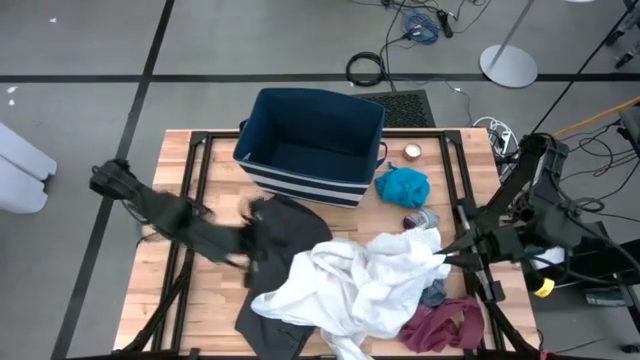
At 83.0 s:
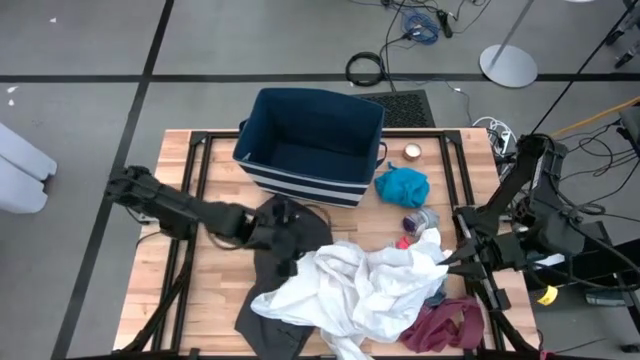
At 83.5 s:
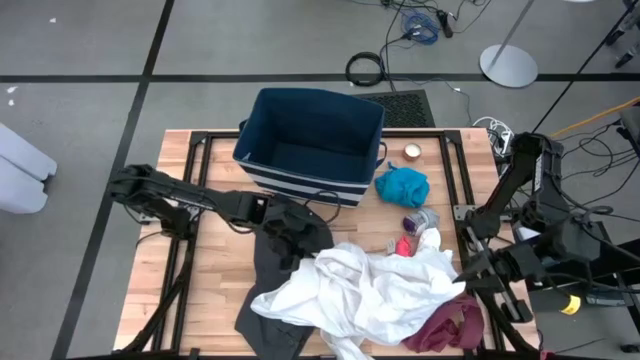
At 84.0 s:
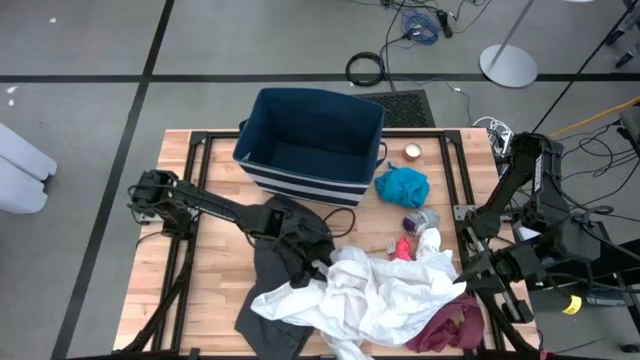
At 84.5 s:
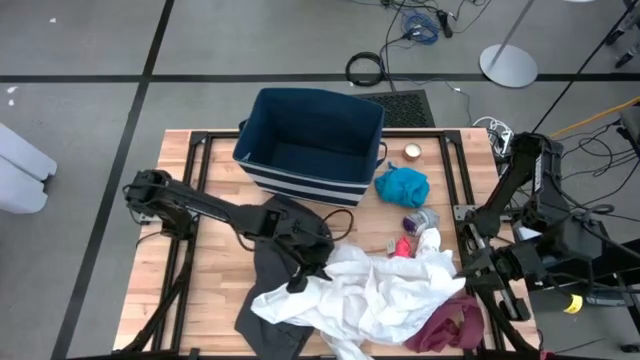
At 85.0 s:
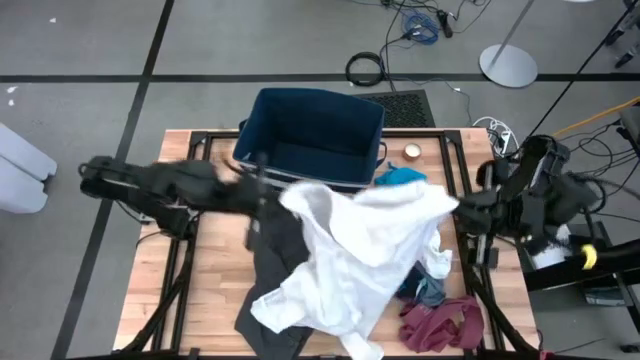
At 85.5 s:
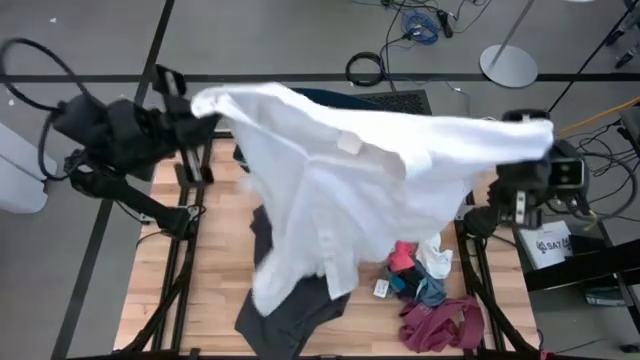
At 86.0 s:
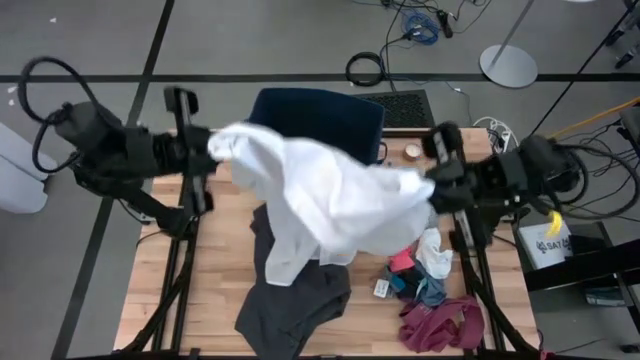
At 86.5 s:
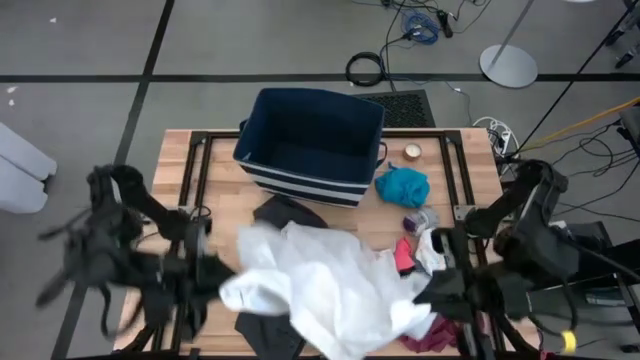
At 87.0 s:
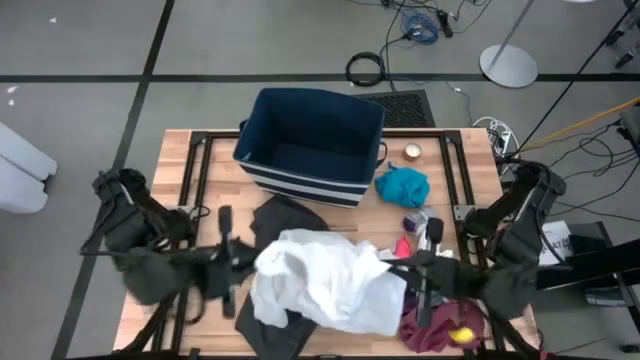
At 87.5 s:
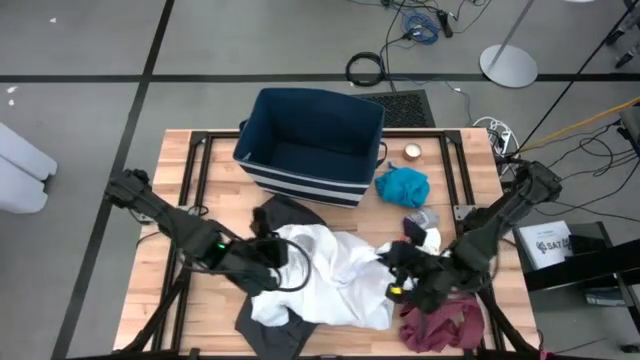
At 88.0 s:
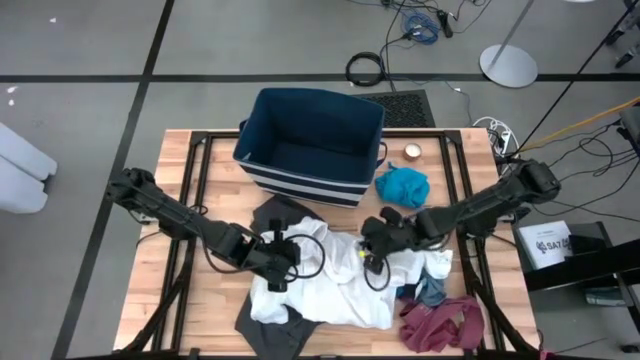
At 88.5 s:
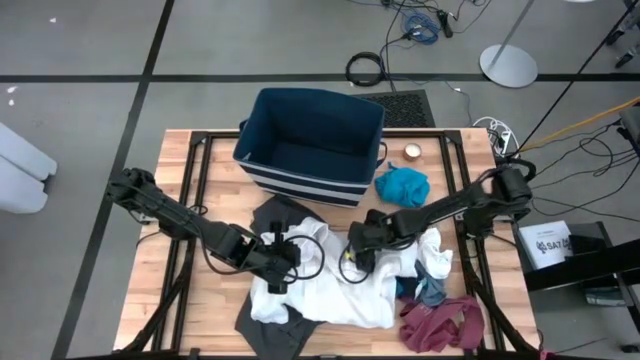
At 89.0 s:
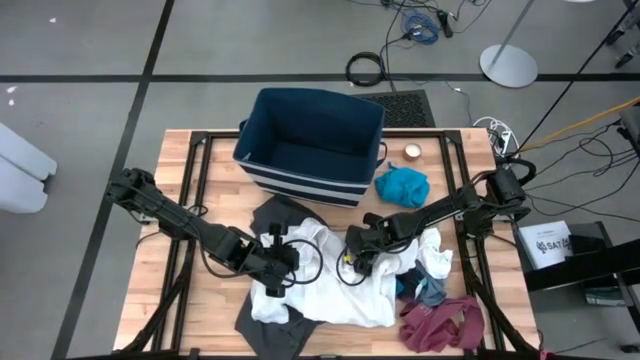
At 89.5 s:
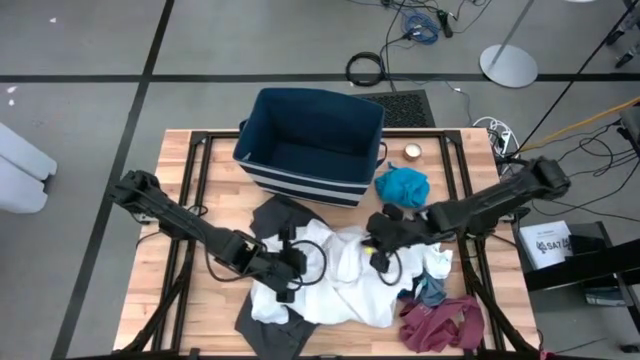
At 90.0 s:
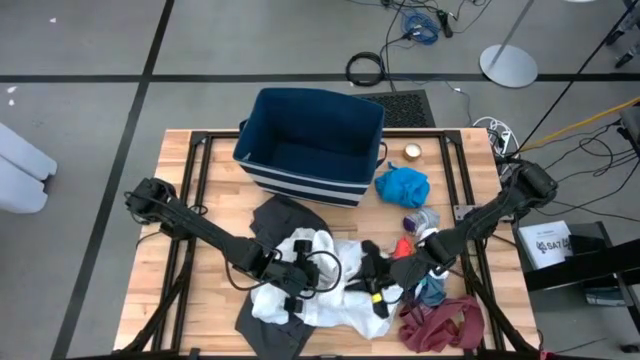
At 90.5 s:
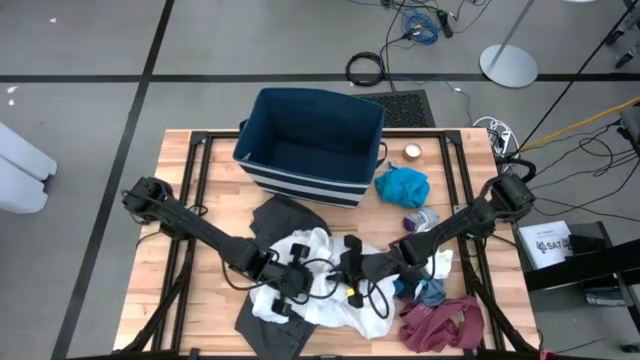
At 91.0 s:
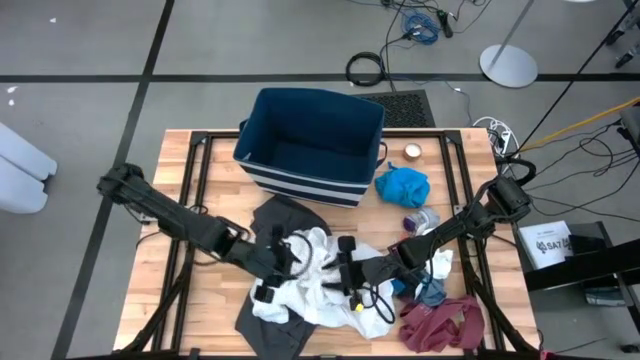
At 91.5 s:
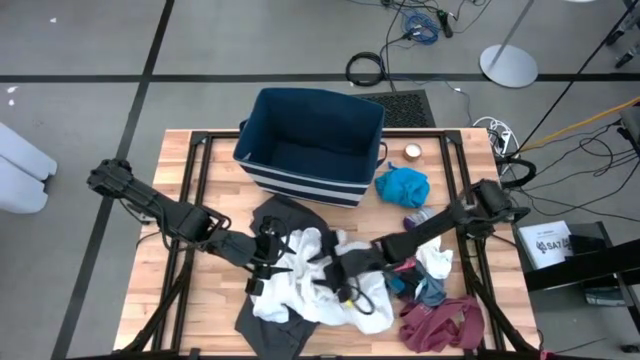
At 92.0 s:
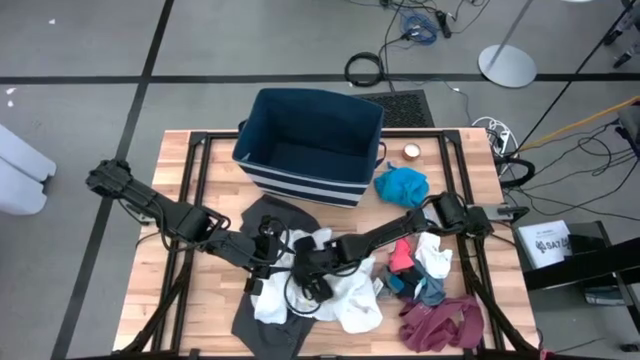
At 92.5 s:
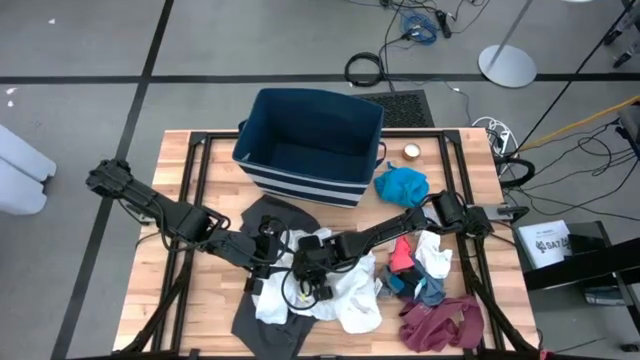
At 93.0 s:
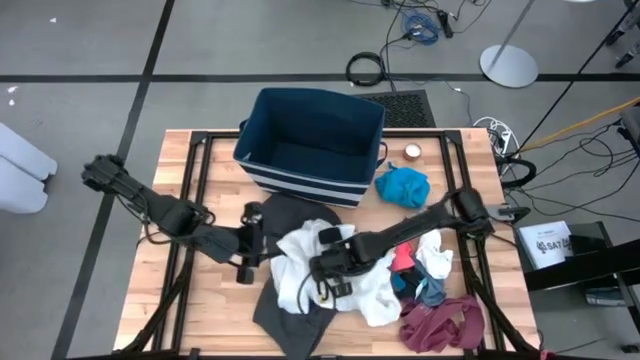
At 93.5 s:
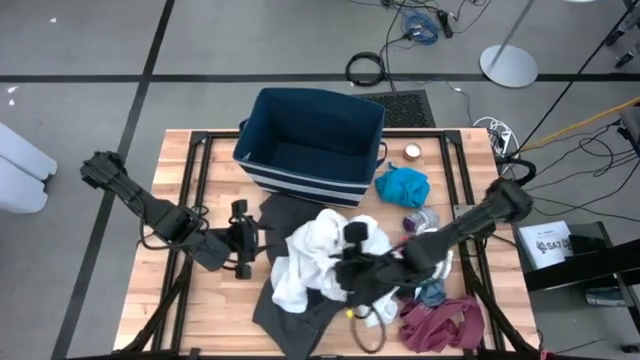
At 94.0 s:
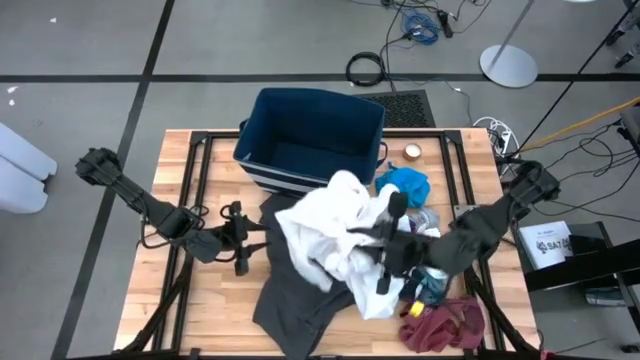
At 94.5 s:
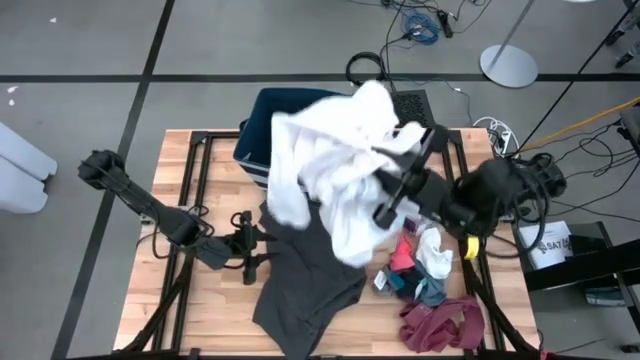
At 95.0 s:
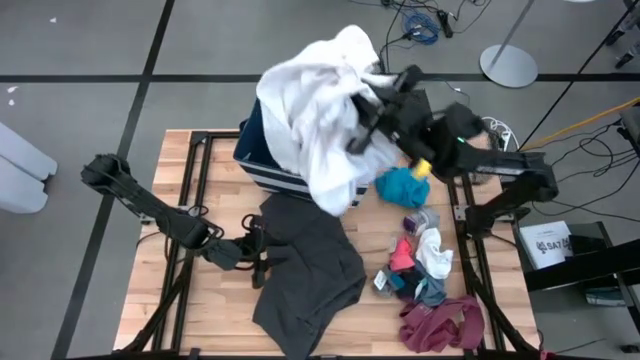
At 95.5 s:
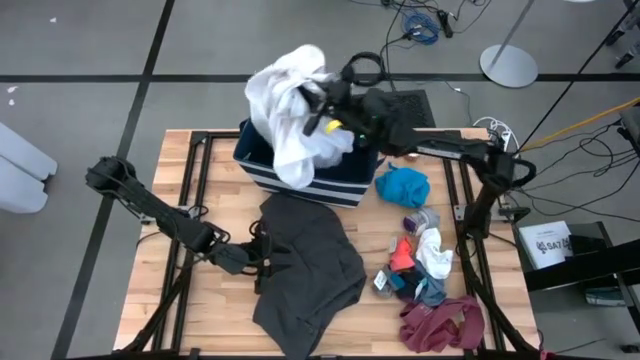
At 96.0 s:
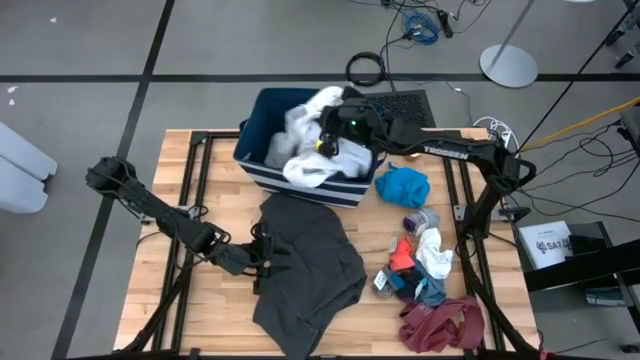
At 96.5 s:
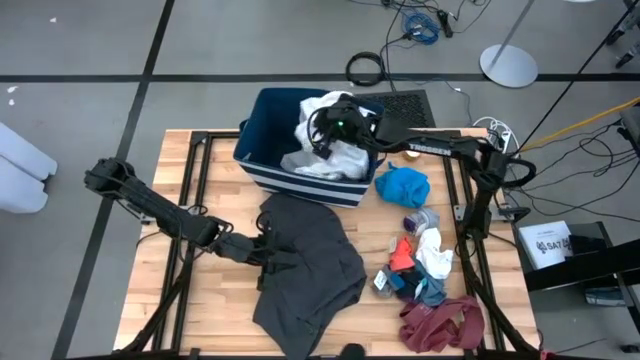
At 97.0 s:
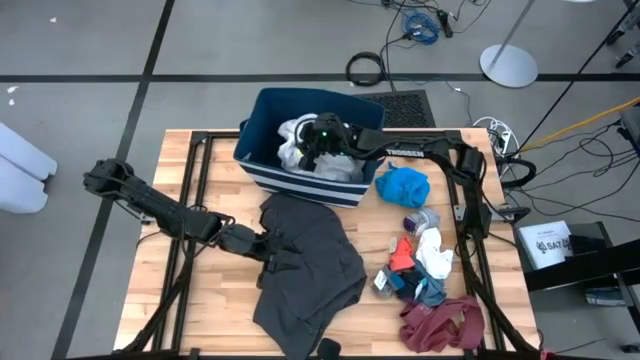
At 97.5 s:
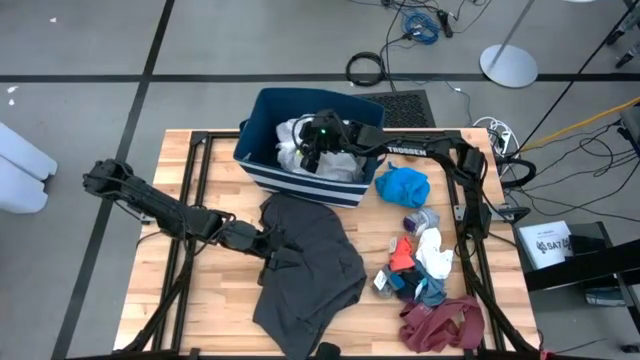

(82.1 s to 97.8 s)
Task: Sort clothes
Put the white shirt into the blue laundry bin

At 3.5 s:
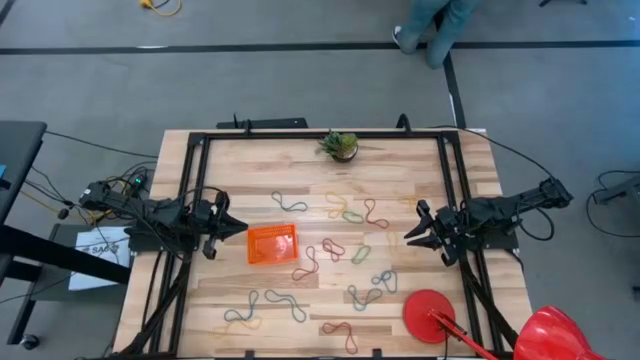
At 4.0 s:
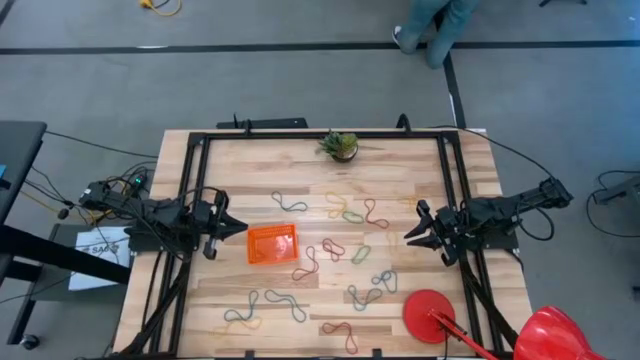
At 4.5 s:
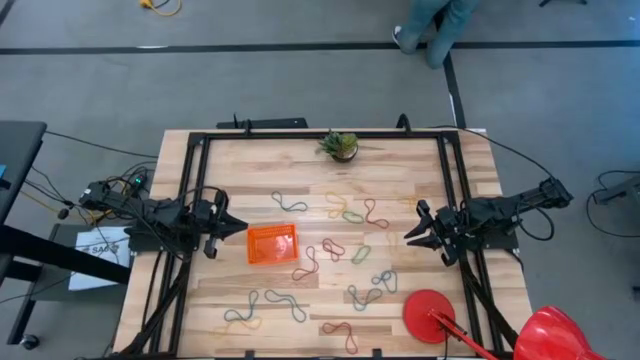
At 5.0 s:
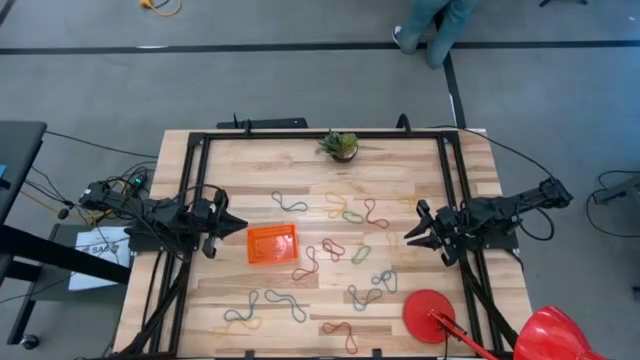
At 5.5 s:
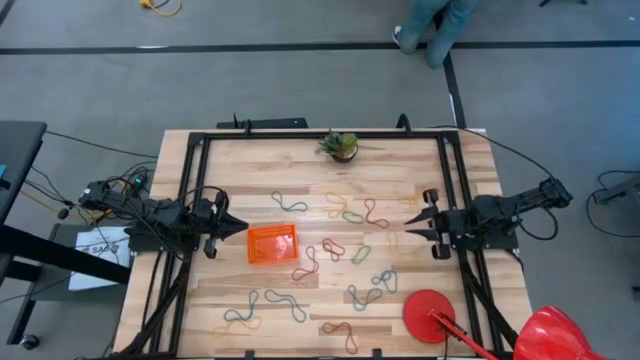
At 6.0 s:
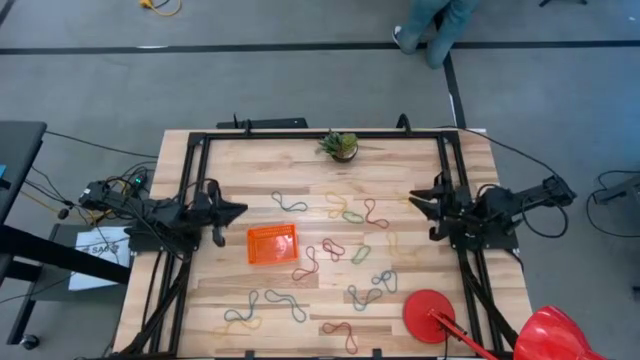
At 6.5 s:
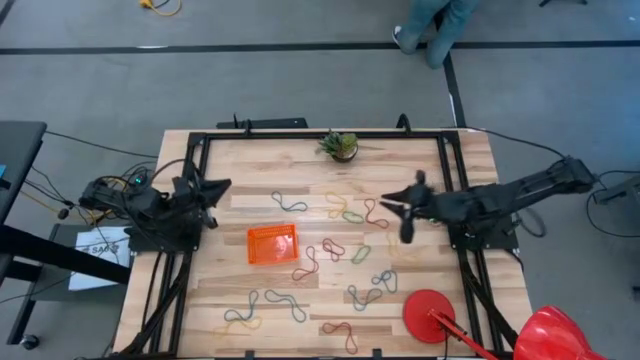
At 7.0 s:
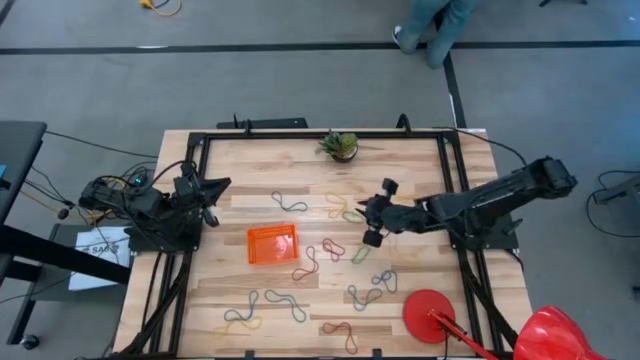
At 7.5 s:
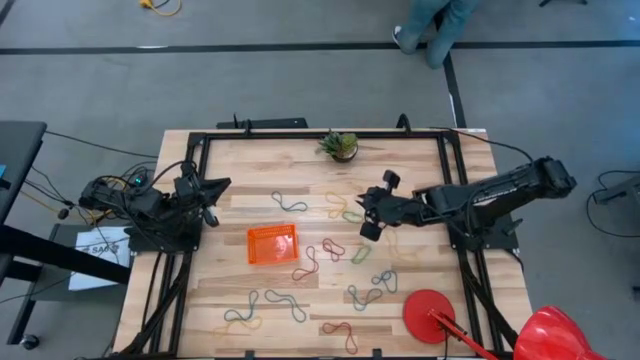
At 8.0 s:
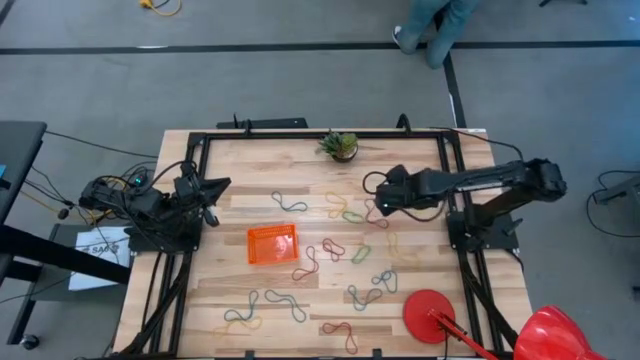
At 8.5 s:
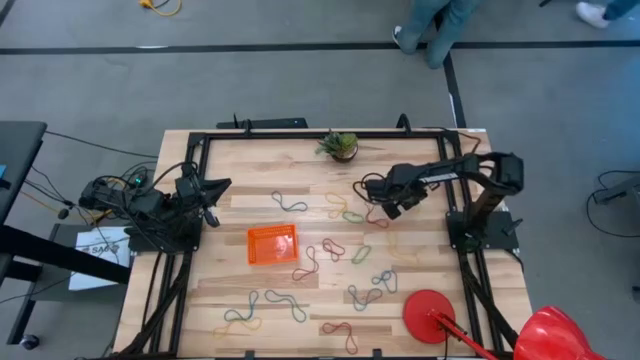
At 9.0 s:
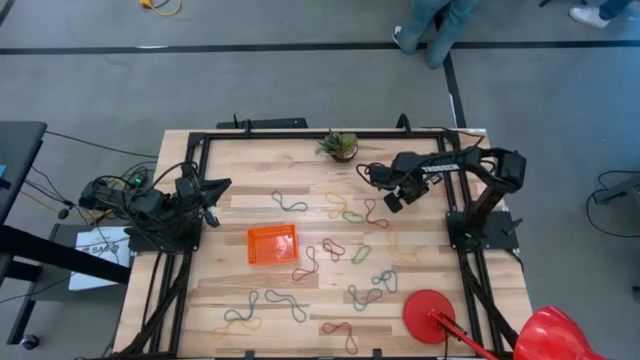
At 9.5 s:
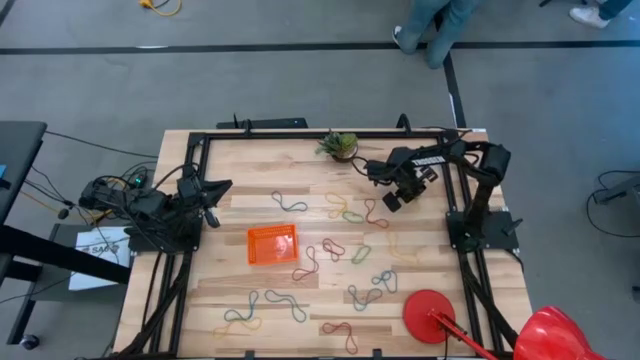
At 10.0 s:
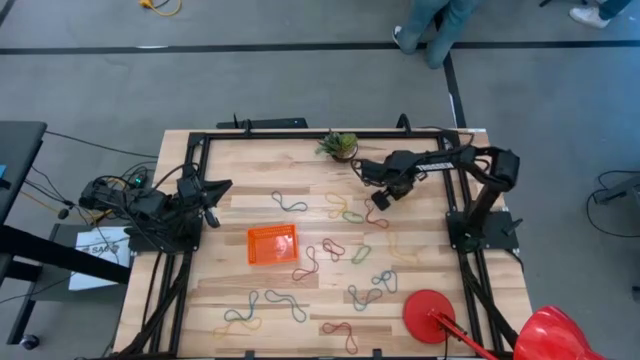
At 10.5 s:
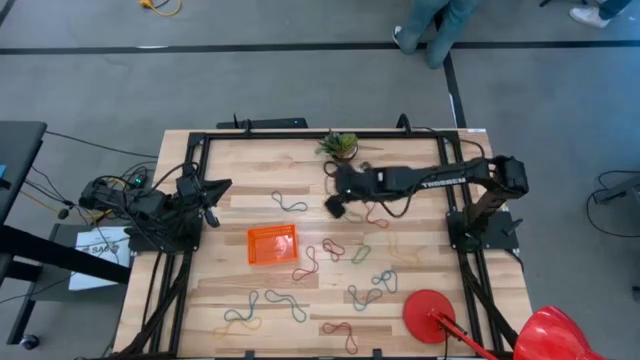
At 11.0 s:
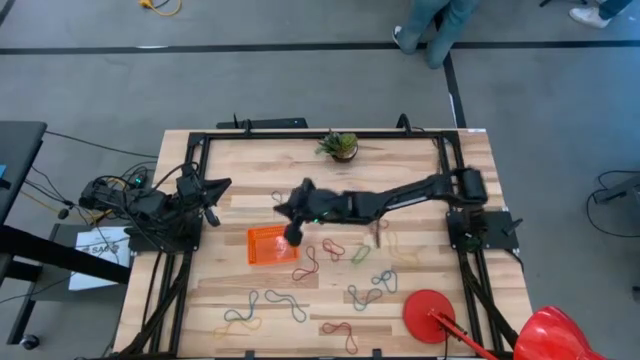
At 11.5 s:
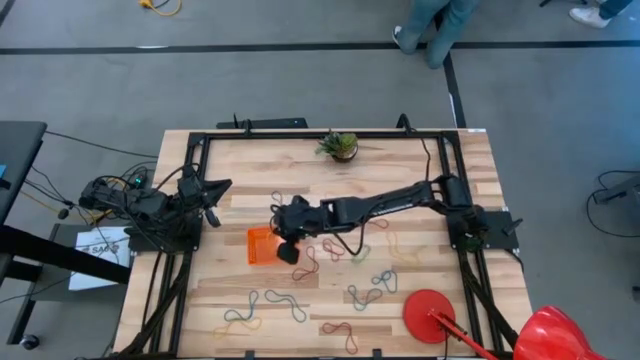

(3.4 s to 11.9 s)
Task: Pick and place rubber bands into bin
Put the yellow rubber band into the orange container
